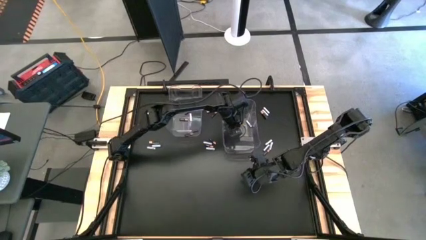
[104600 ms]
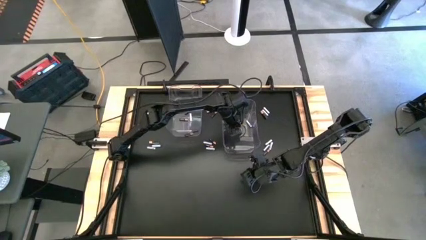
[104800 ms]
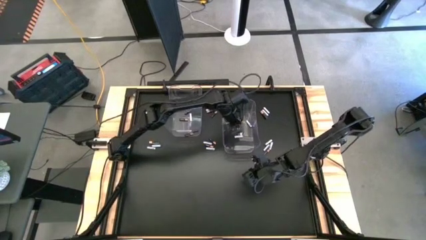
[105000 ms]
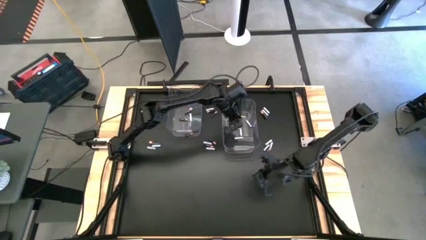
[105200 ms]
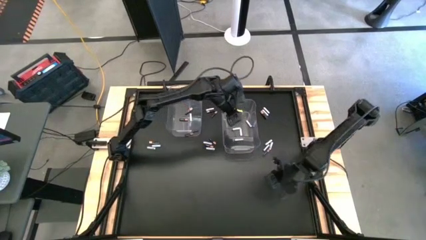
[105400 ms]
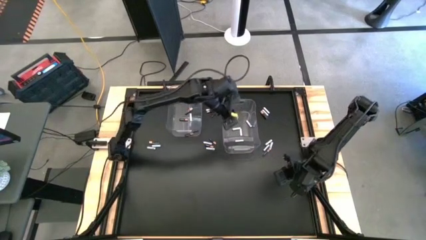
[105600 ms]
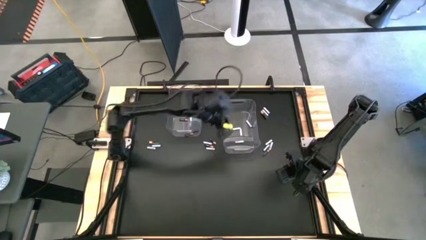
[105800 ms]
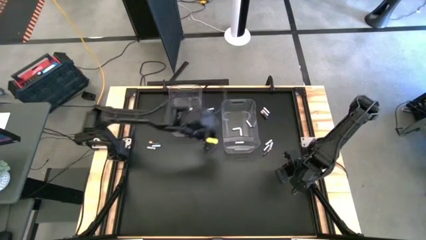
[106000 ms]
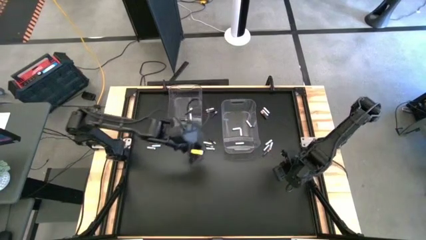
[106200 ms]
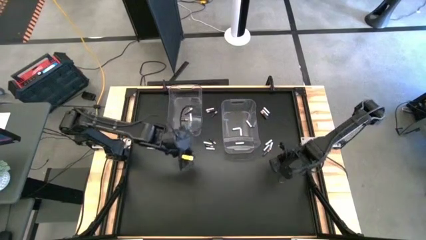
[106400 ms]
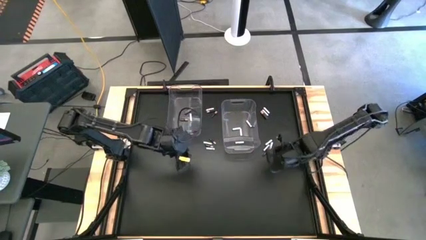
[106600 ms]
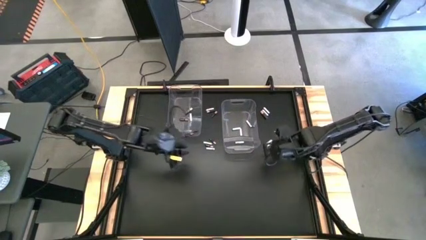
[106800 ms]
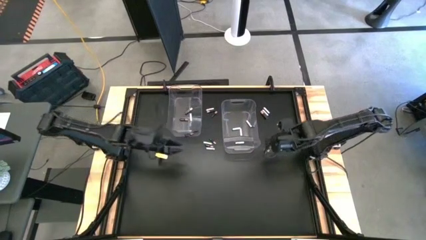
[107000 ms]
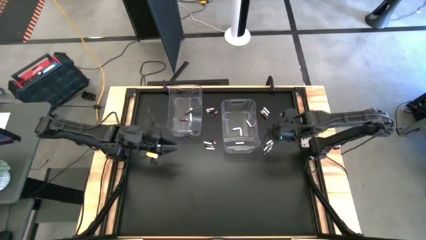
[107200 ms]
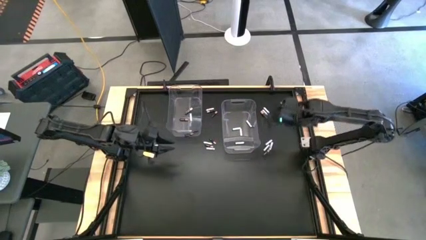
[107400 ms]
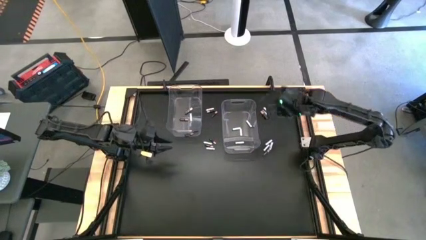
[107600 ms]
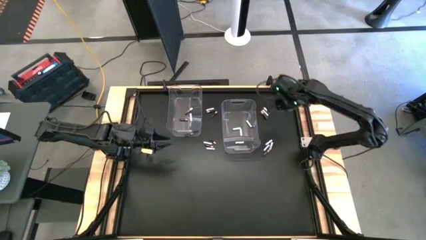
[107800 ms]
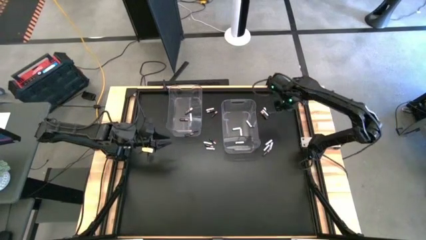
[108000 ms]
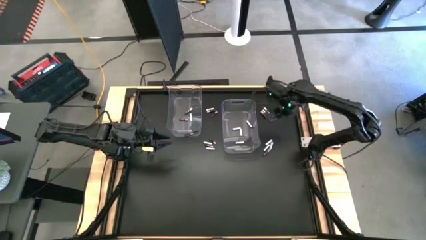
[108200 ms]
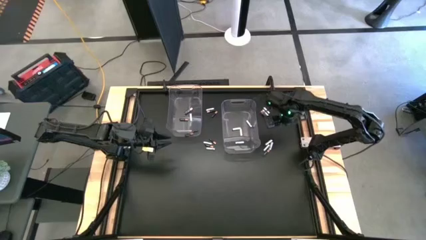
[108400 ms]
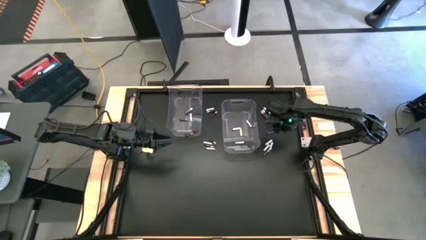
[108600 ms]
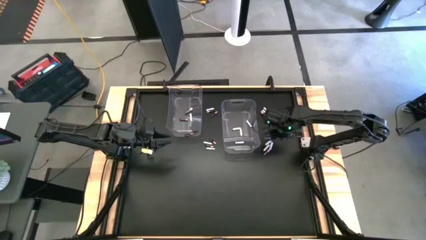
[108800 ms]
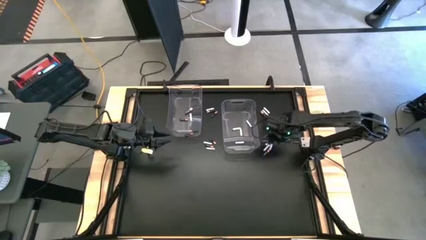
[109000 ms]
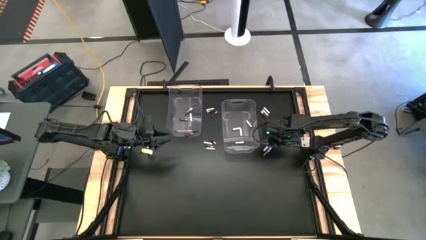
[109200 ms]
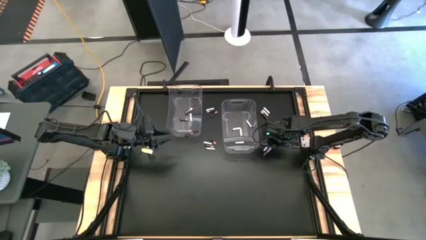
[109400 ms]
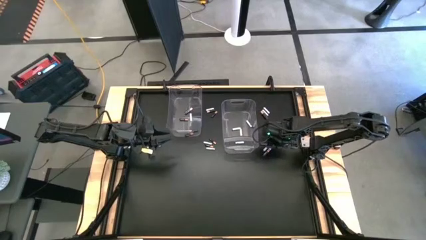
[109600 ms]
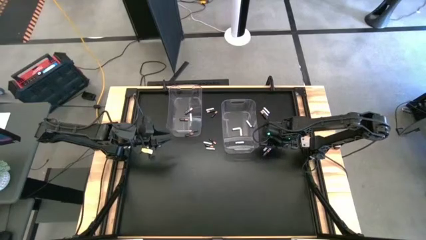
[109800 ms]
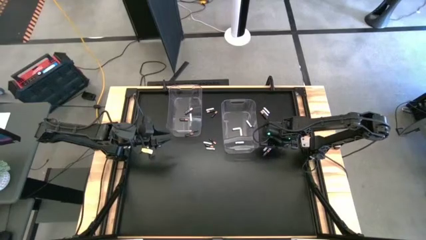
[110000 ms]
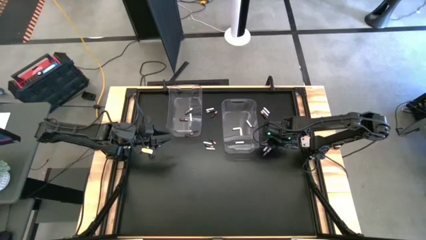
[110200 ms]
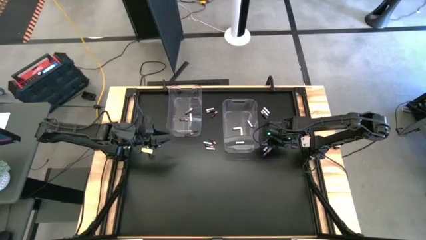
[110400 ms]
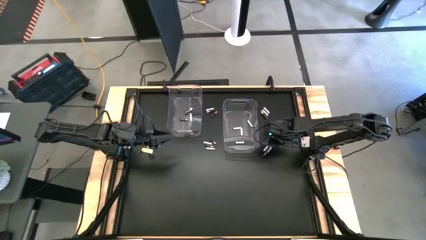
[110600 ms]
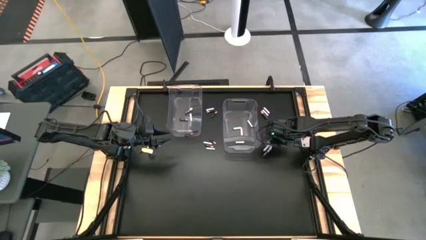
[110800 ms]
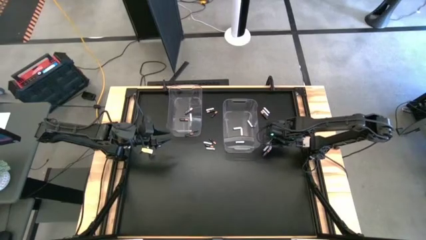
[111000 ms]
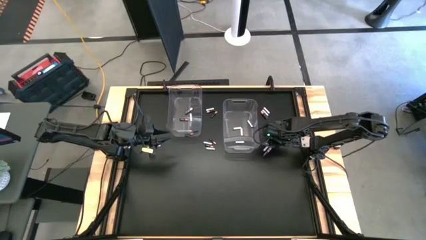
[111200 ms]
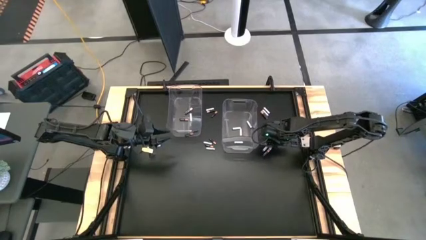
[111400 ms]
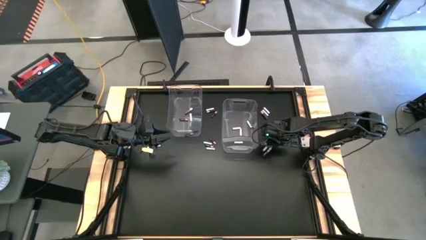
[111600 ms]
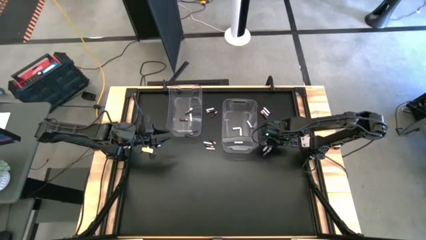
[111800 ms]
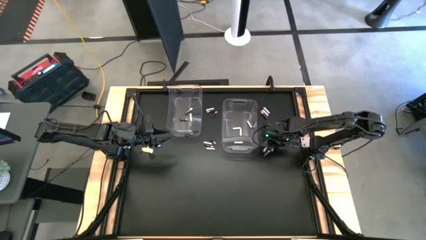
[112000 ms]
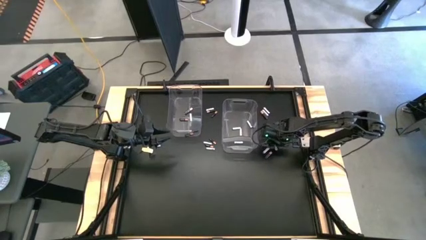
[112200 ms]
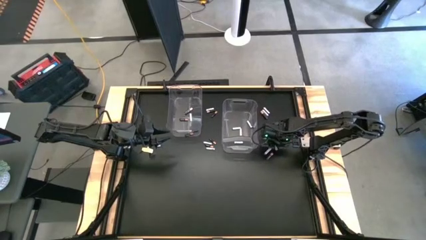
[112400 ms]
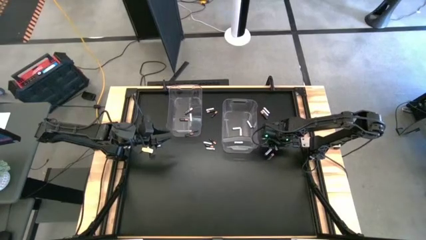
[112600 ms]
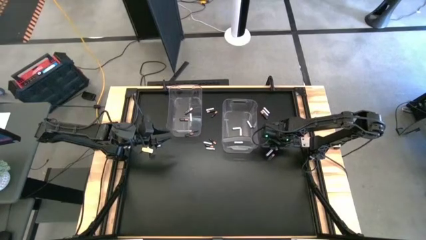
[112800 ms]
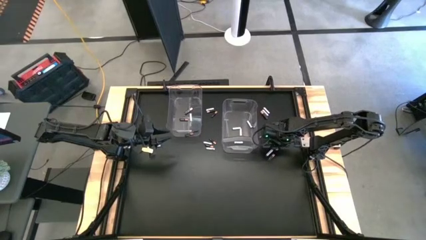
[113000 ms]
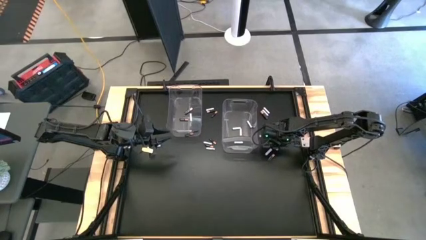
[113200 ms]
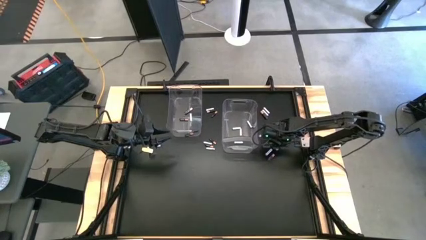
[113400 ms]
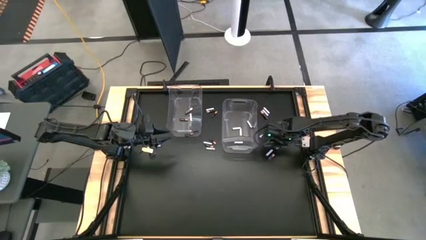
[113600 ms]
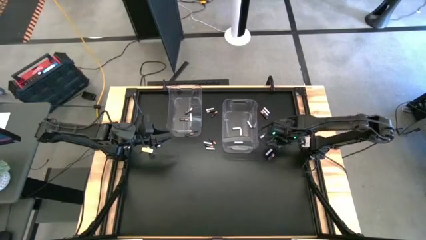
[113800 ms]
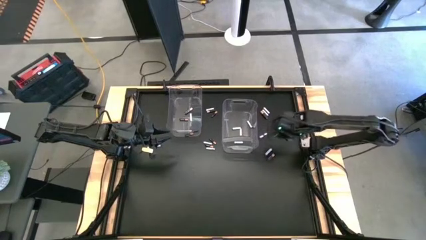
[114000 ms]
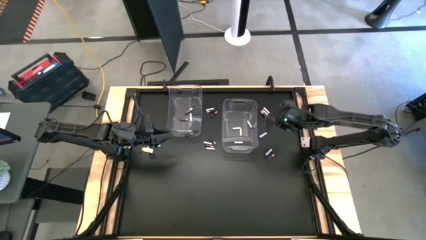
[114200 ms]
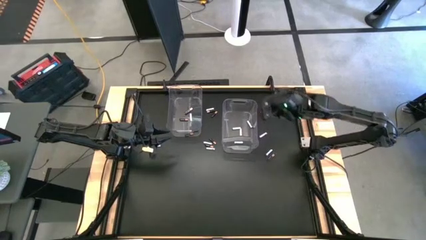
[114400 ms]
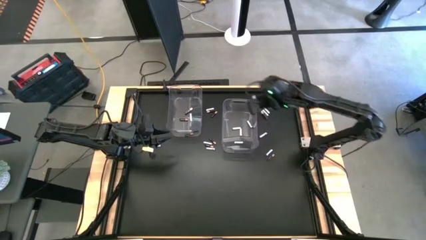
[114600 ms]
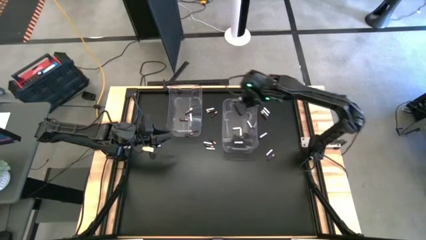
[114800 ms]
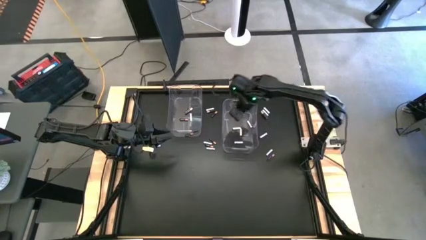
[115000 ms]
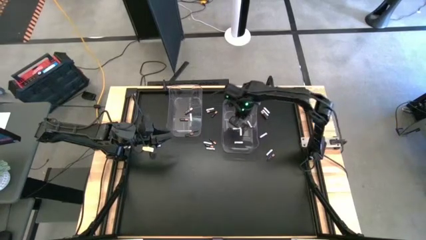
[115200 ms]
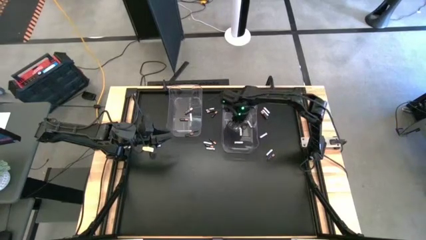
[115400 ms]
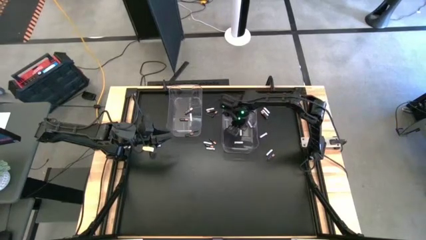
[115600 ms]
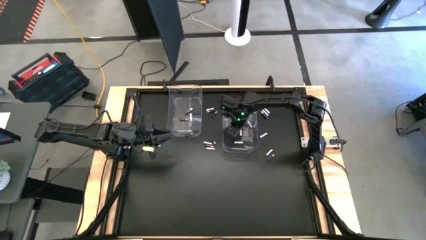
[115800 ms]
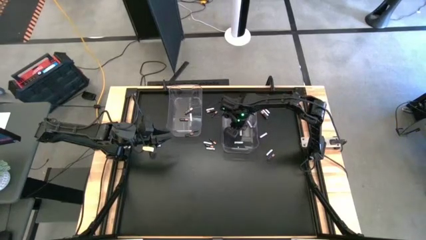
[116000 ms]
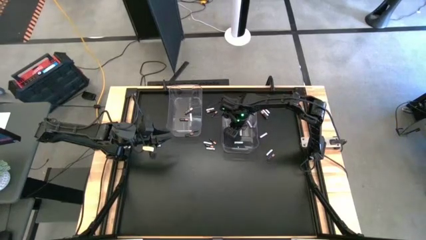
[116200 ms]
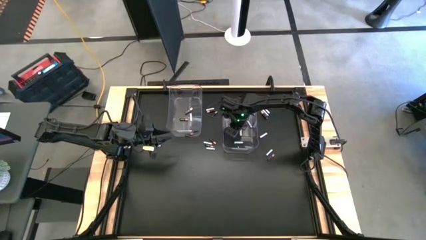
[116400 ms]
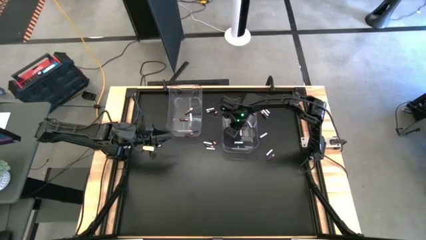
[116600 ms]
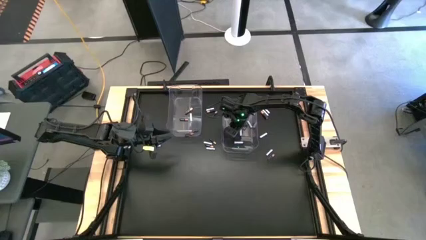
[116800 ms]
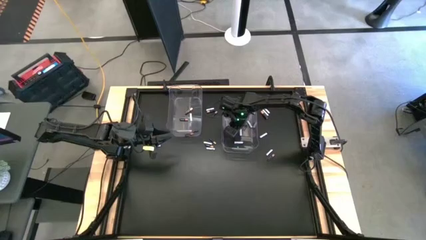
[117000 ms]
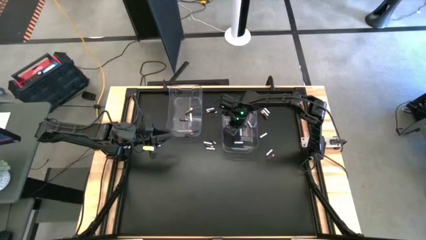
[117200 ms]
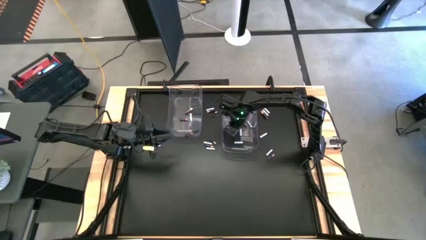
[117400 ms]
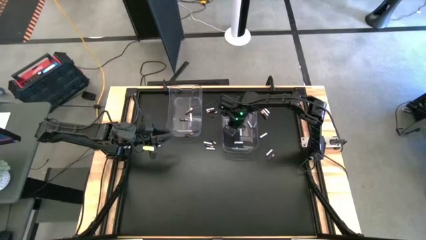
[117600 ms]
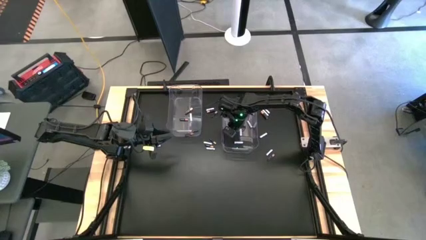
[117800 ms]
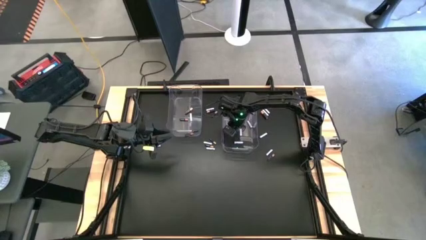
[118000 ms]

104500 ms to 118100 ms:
Task: Sort batteries
Put the white battery into the right transparent bin
